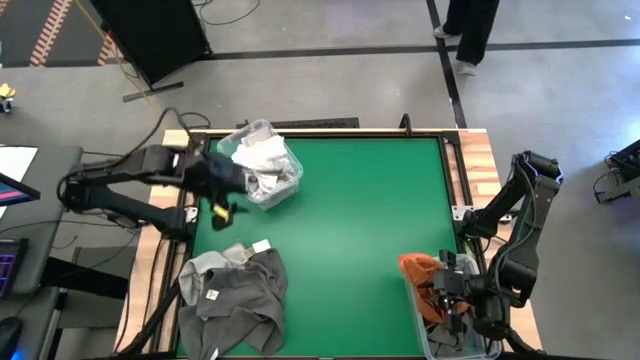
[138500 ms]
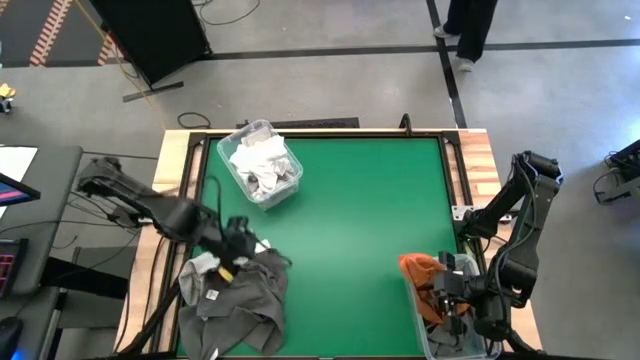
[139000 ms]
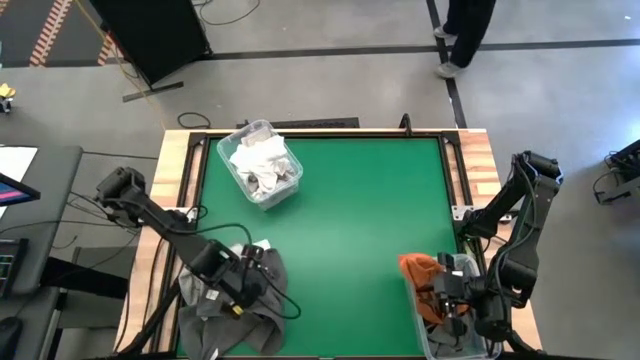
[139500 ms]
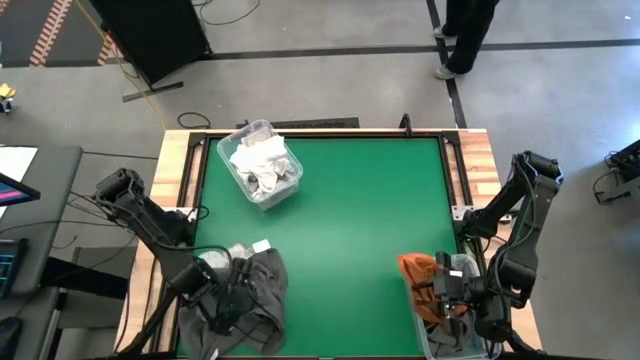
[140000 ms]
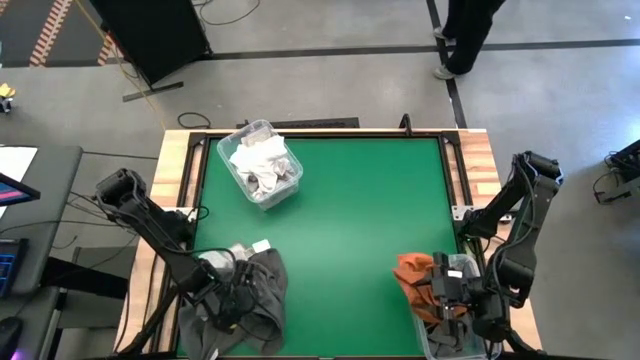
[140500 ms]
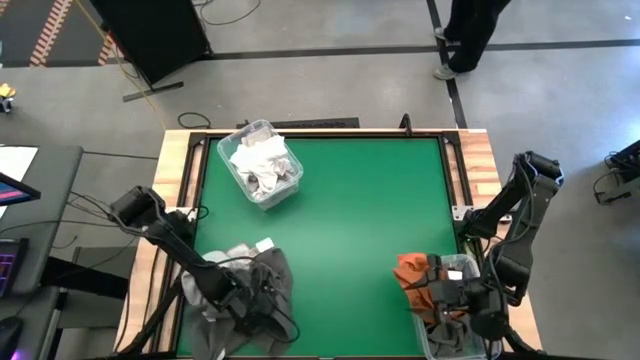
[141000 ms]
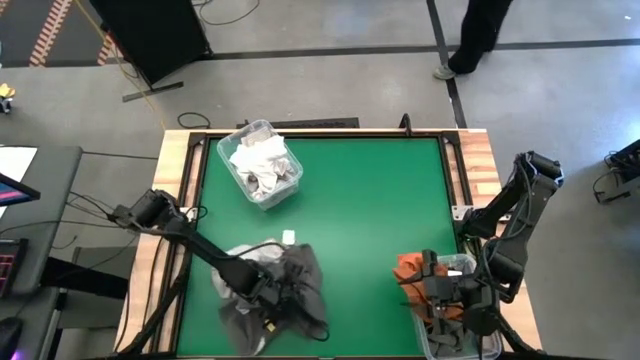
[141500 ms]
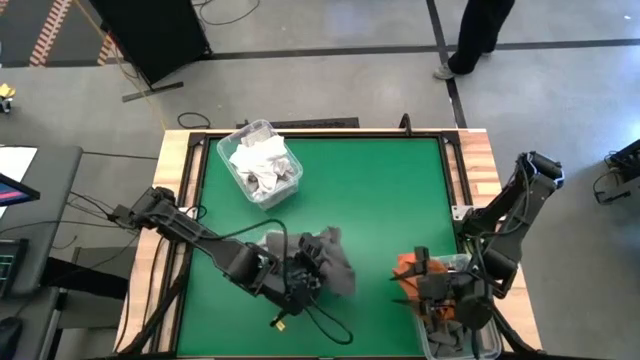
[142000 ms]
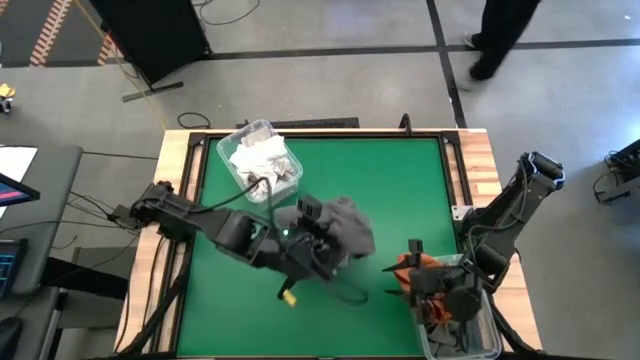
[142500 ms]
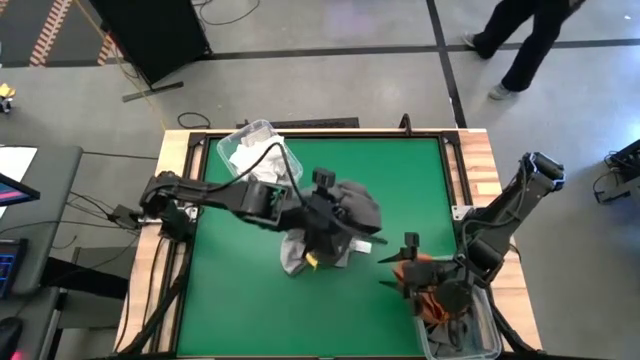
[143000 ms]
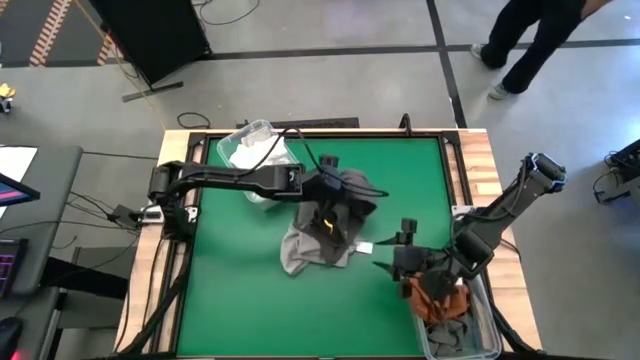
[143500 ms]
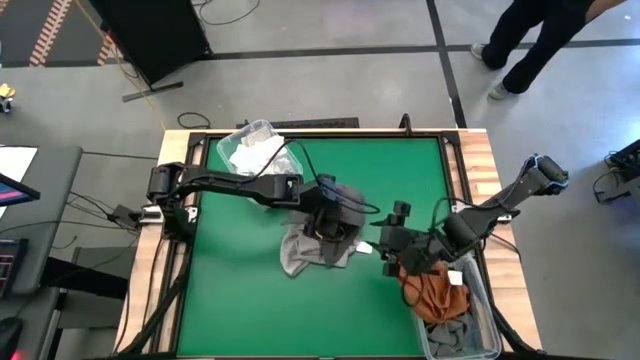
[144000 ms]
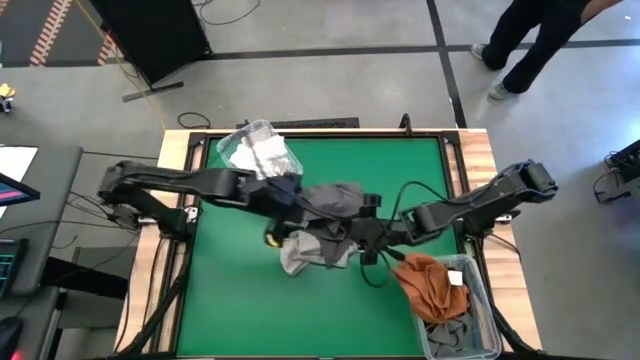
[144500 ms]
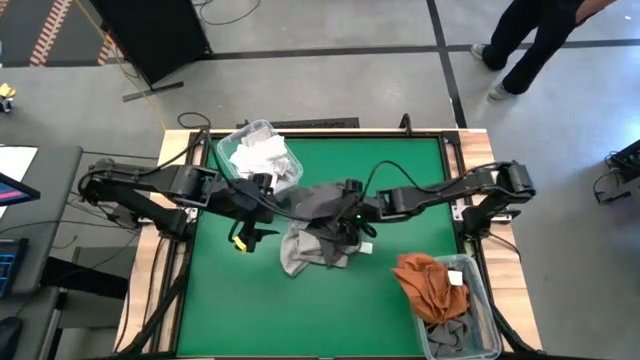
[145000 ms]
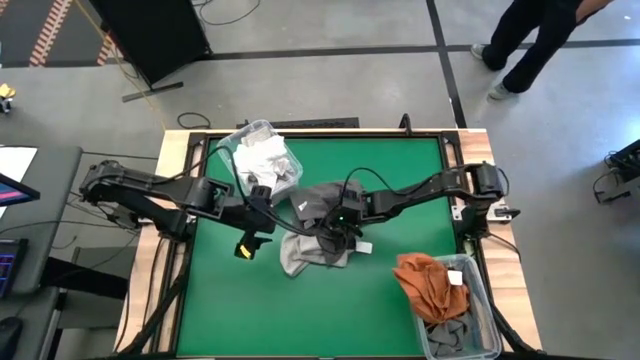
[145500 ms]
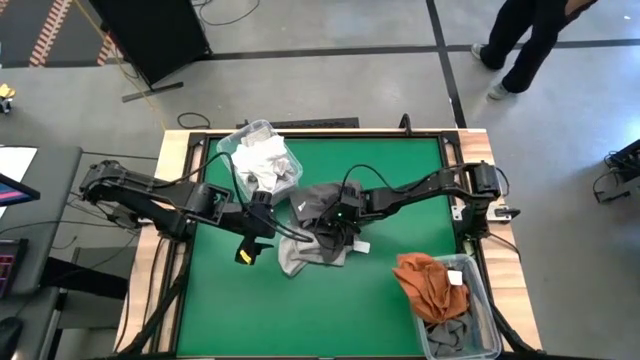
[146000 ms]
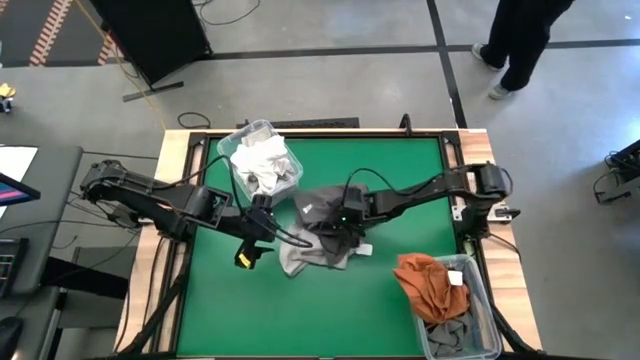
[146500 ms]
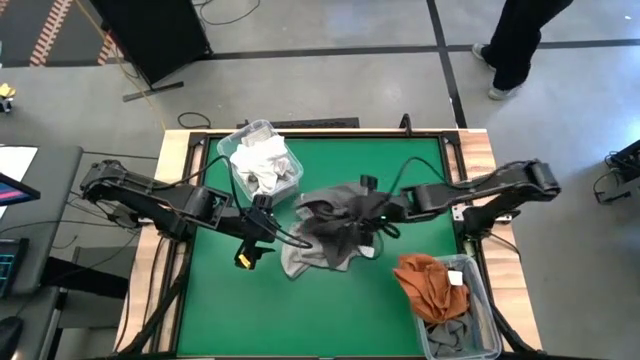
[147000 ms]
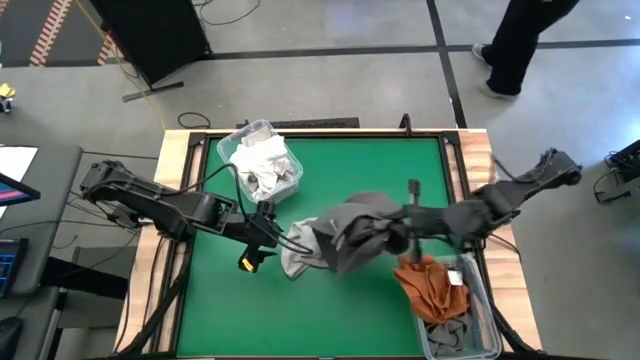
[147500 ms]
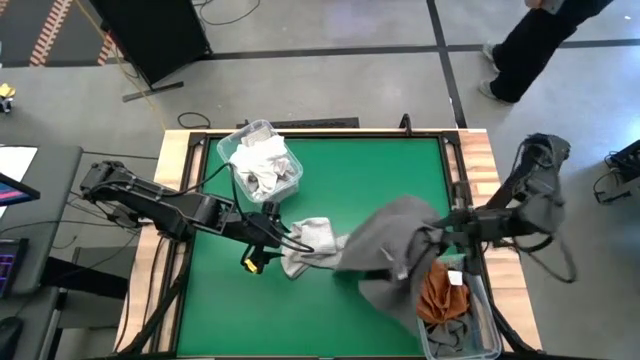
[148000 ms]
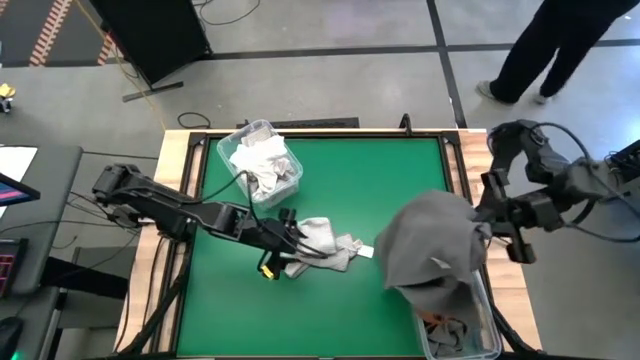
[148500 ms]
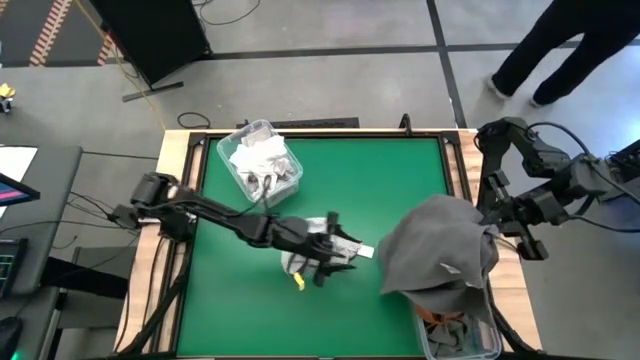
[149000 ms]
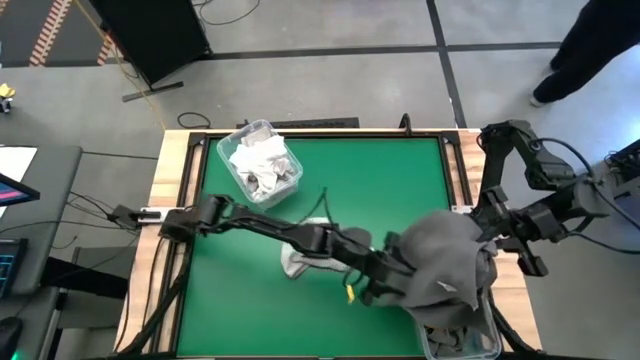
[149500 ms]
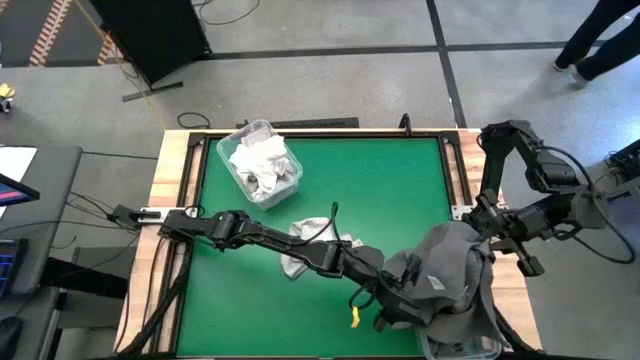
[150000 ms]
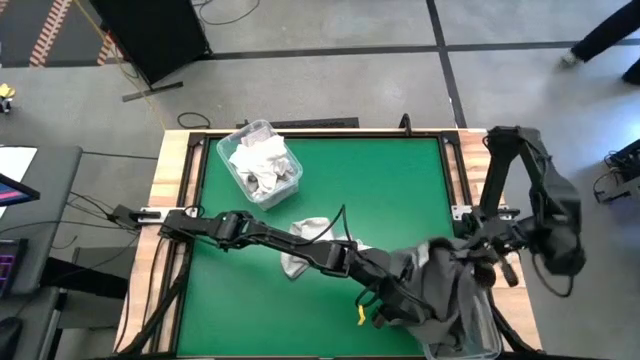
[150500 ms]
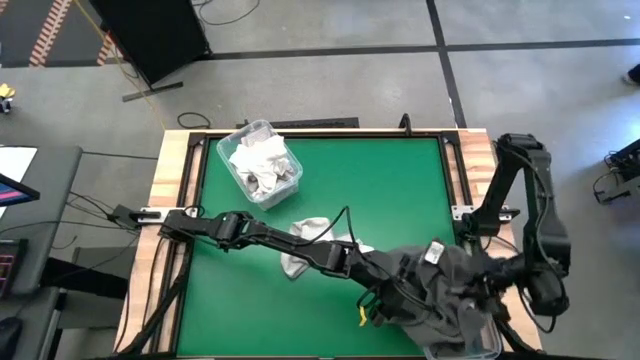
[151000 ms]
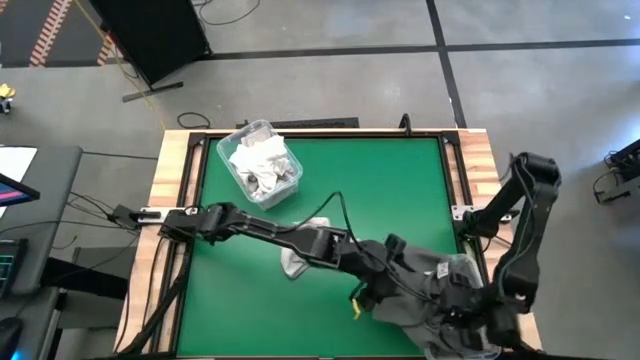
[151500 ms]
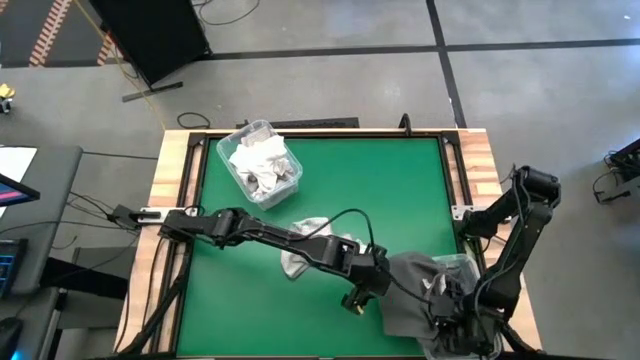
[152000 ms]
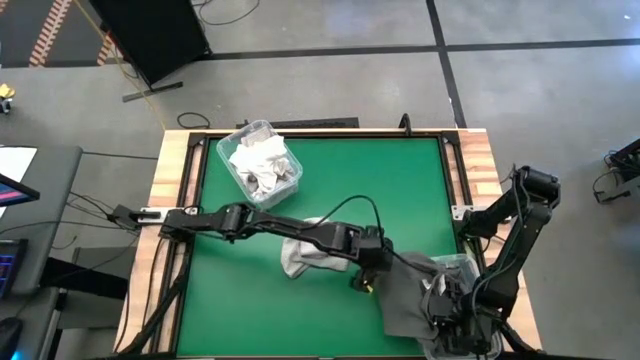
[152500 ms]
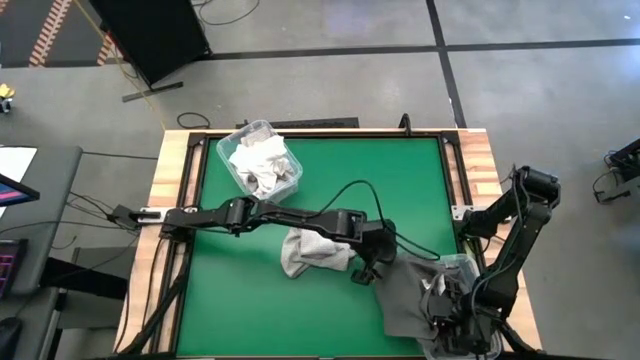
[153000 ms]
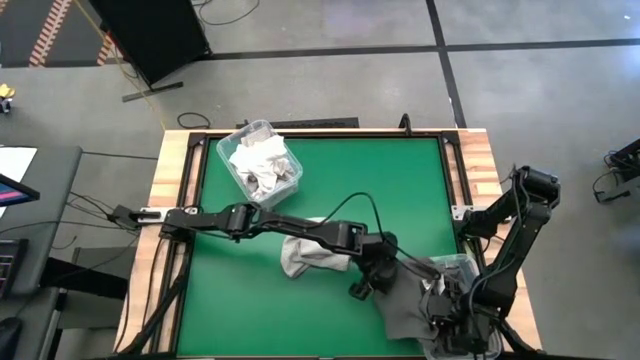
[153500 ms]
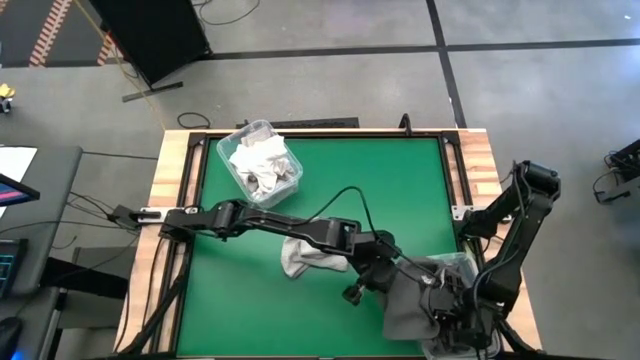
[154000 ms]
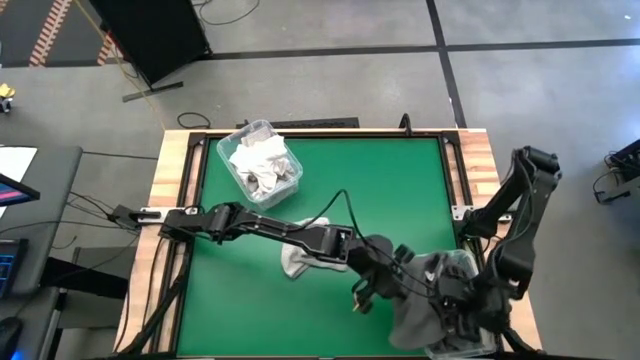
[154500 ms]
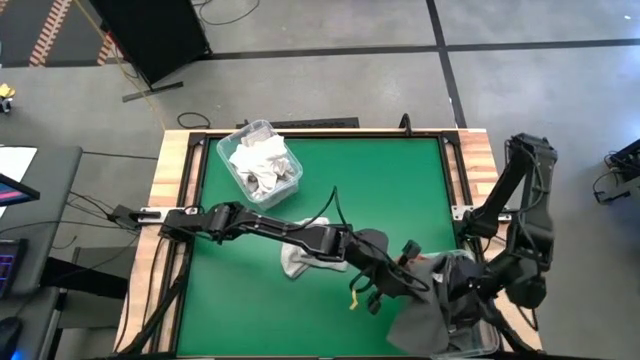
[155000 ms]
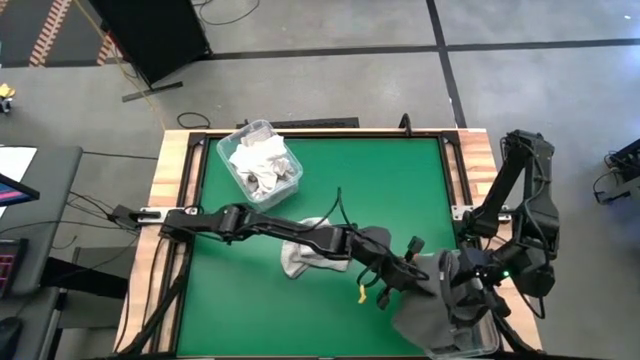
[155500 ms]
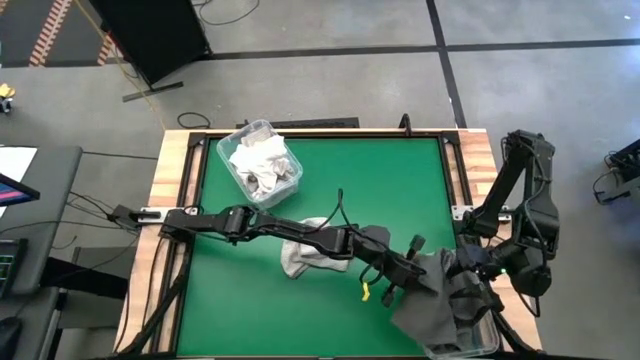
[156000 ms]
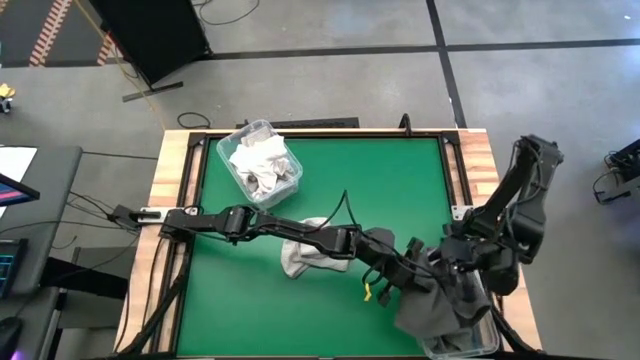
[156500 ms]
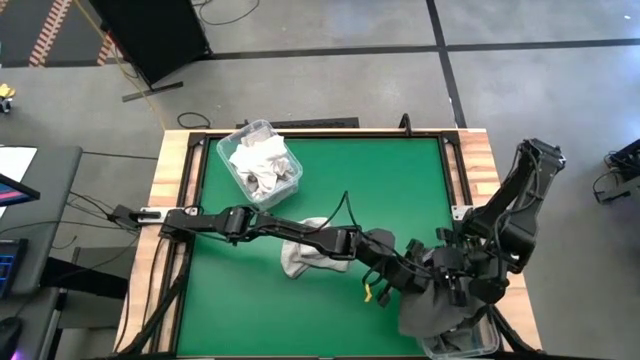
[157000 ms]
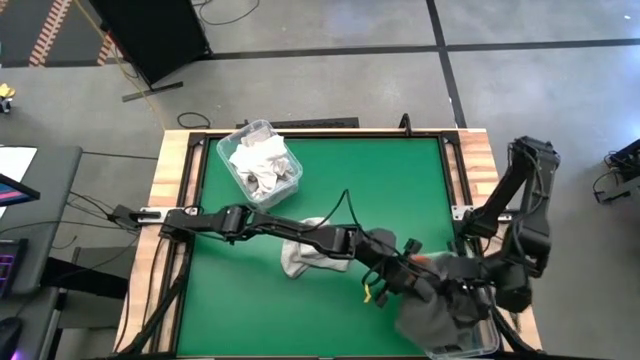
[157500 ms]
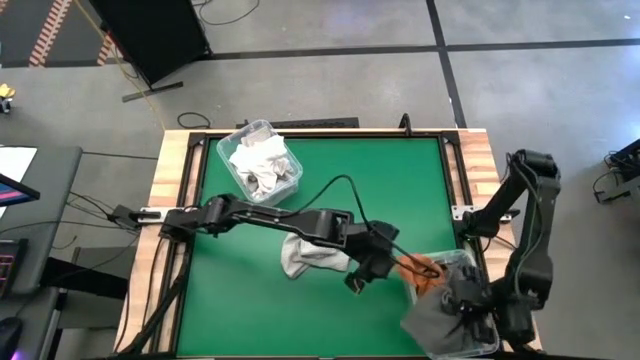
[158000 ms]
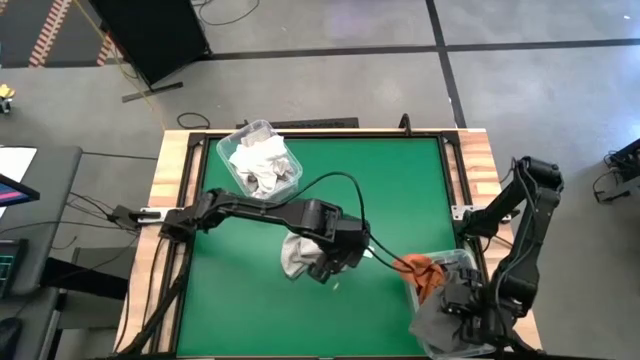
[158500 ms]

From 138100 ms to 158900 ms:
Task: Sort towels by color in basket
Put the gray towel into the bottom transparent bin

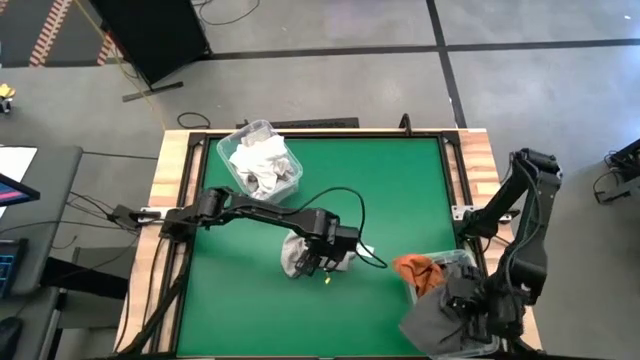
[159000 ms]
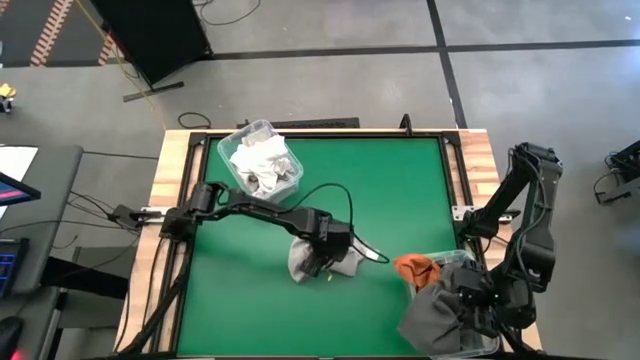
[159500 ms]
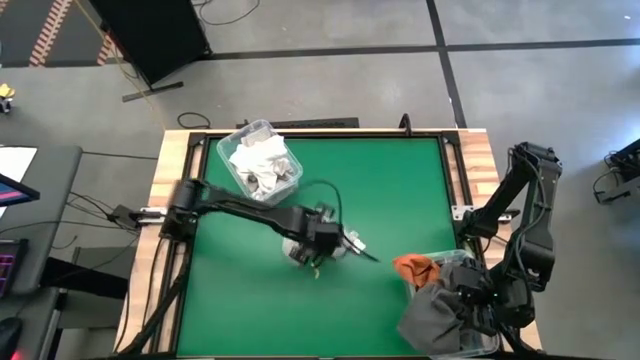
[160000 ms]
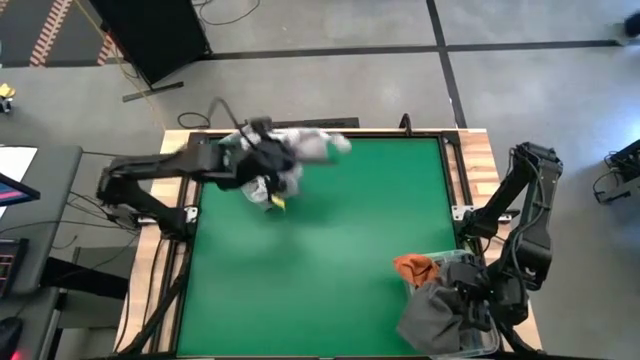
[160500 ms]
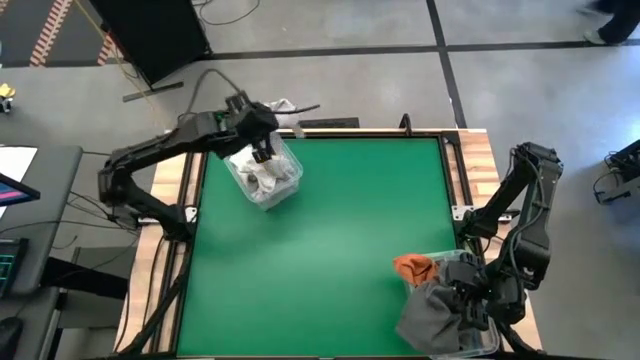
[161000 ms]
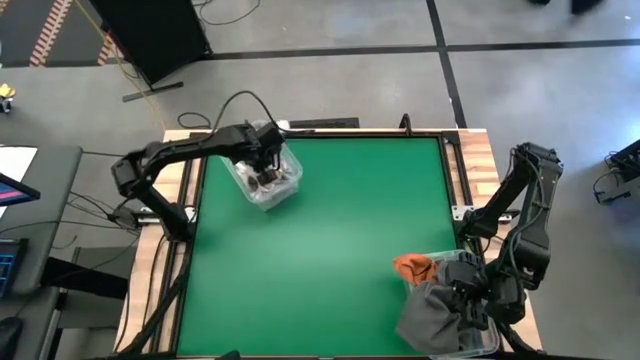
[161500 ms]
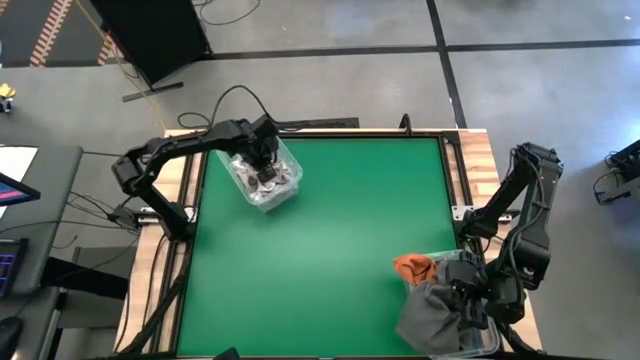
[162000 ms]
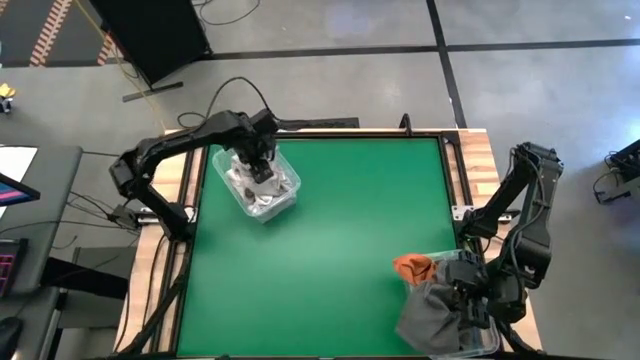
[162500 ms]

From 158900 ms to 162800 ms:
Put the light gray towel into the top transparent bin
